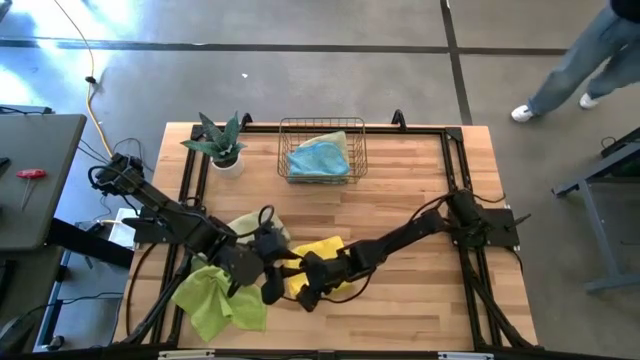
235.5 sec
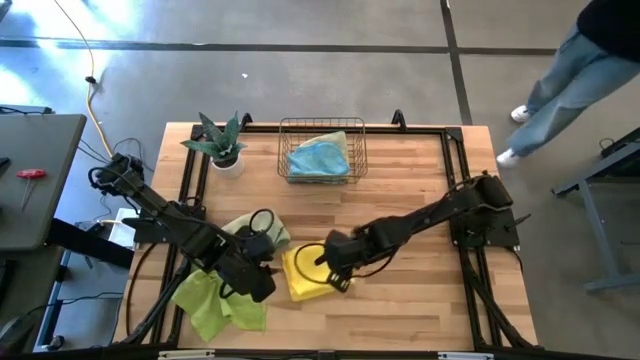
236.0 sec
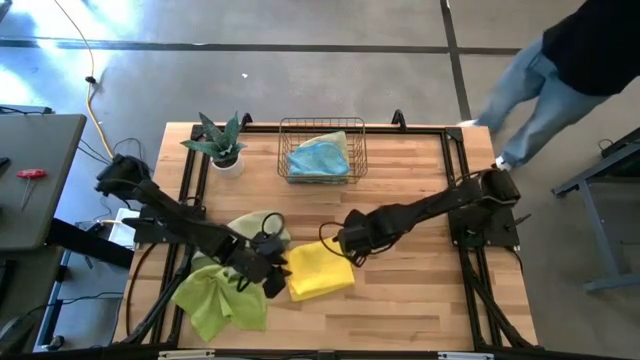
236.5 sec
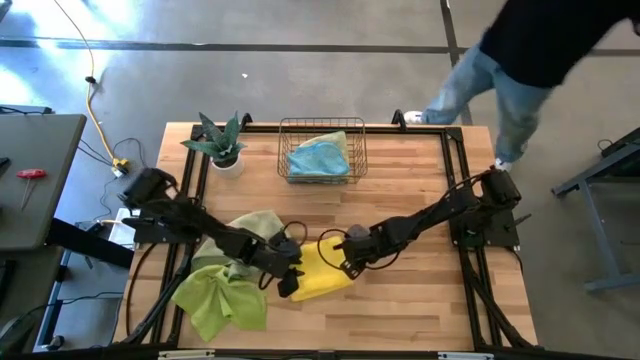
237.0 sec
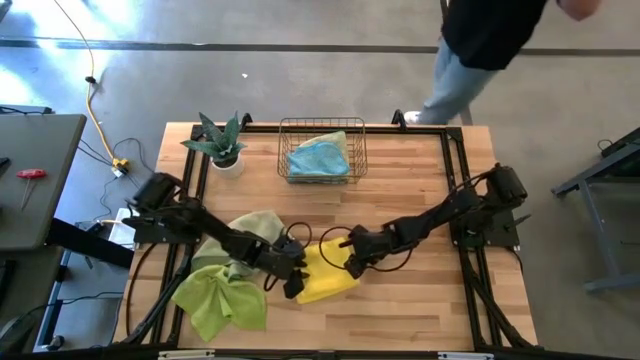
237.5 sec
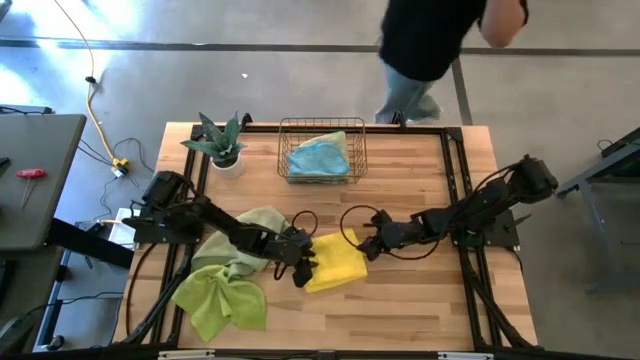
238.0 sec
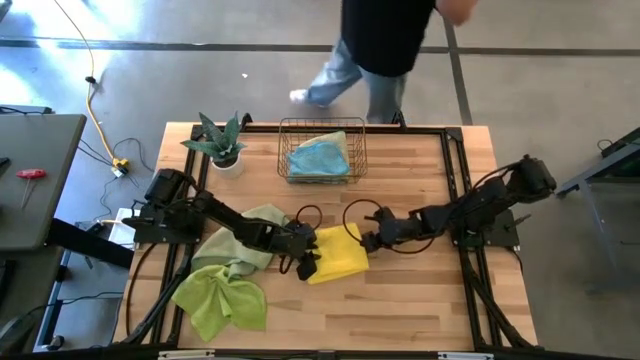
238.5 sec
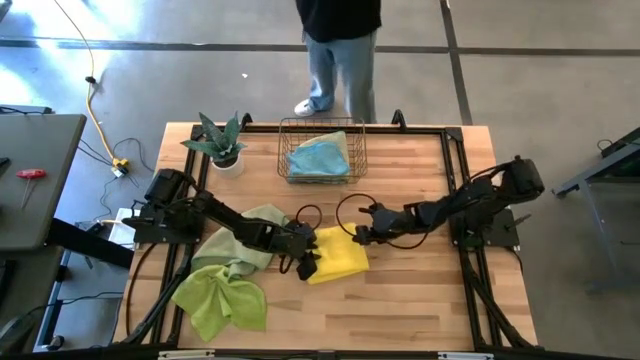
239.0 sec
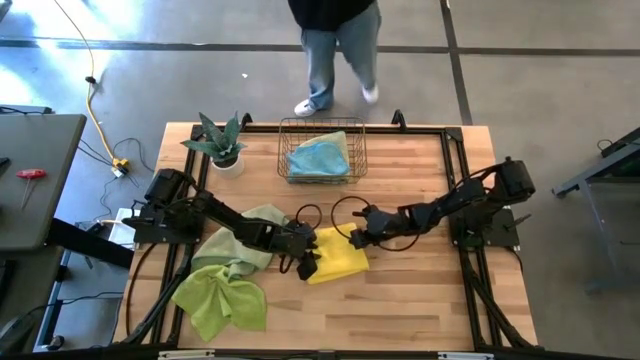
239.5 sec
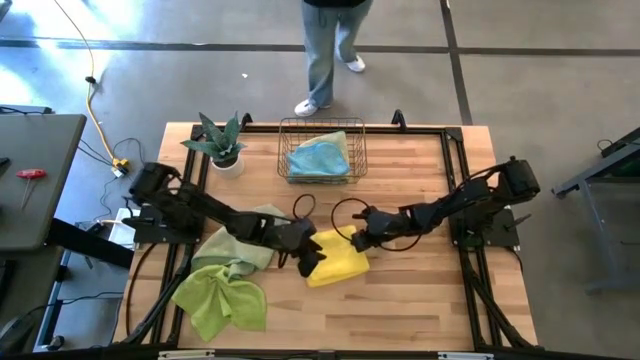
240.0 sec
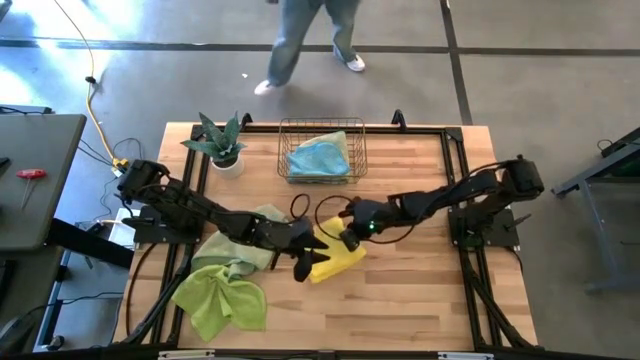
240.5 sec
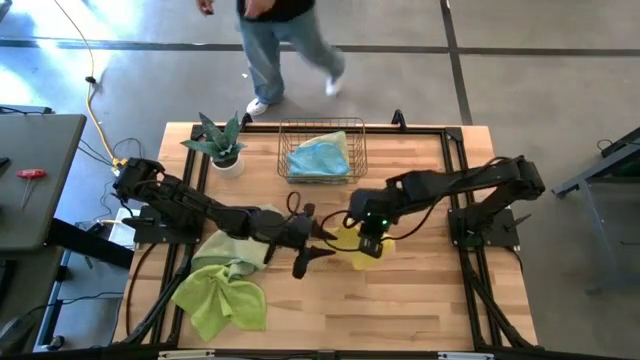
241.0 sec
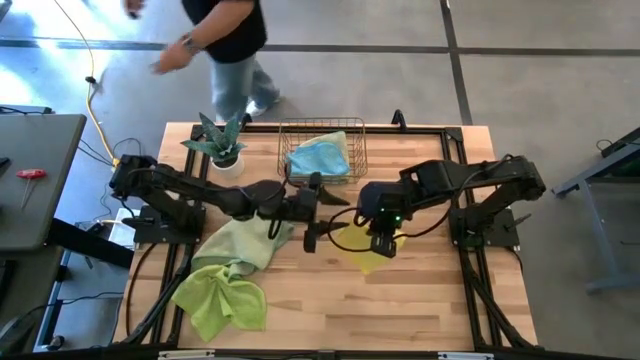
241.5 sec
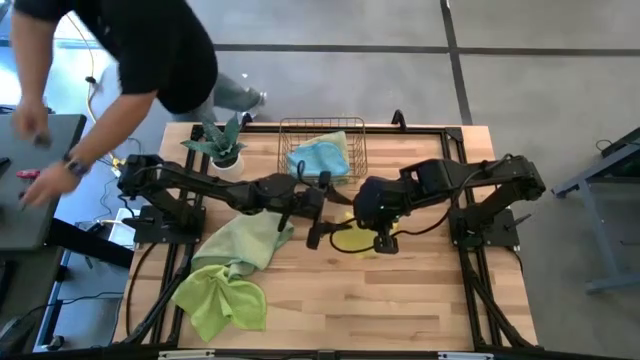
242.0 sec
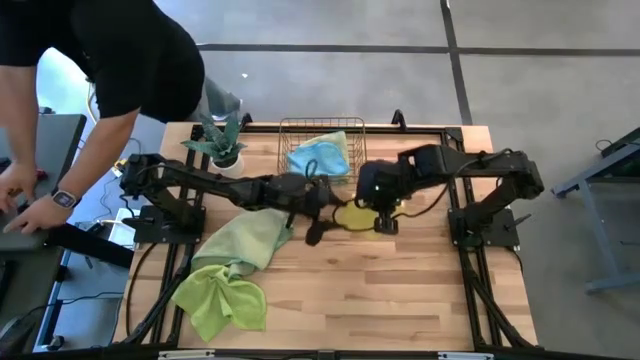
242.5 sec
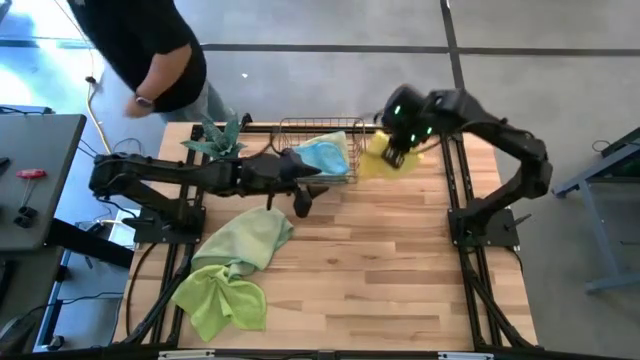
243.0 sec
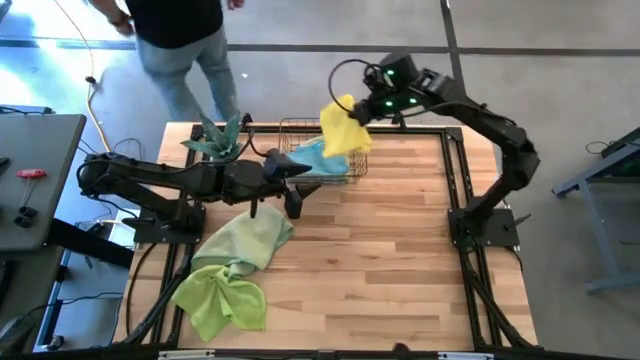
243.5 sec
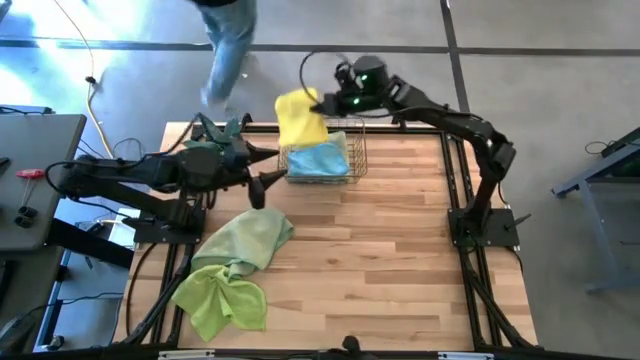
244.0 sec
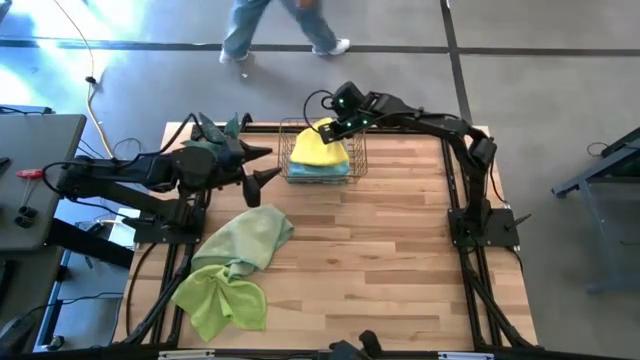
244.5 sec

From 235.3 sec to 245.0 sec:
Task: Fold microfiber towels
Put the yellow microfiber cloth in the basket

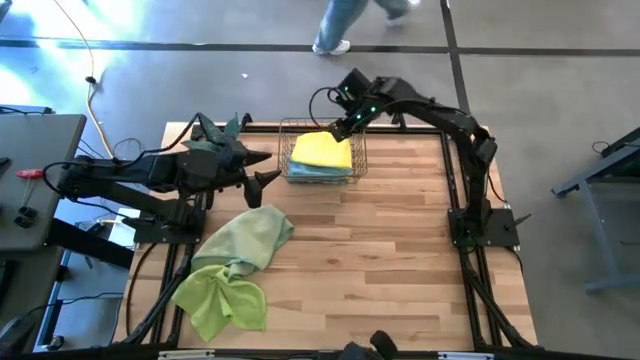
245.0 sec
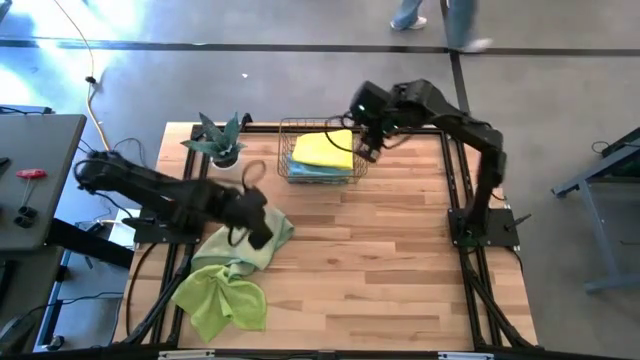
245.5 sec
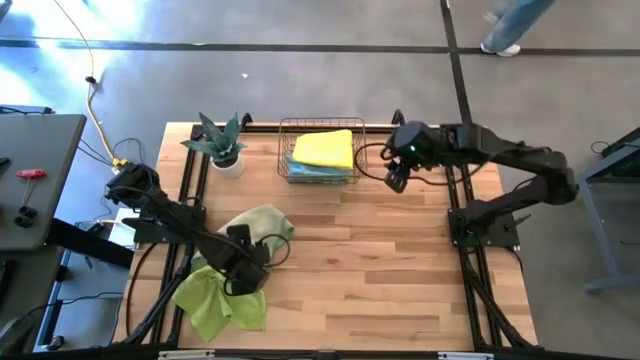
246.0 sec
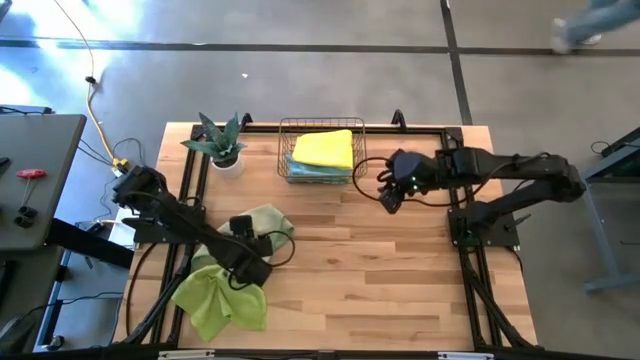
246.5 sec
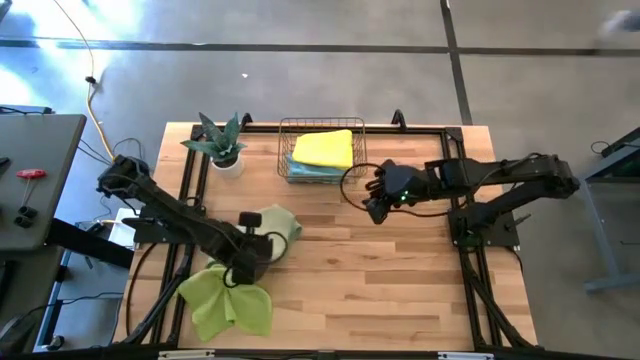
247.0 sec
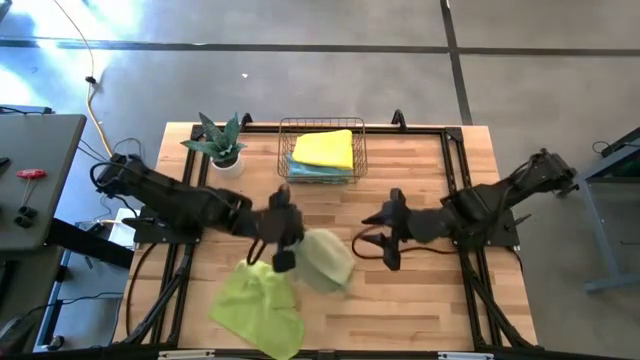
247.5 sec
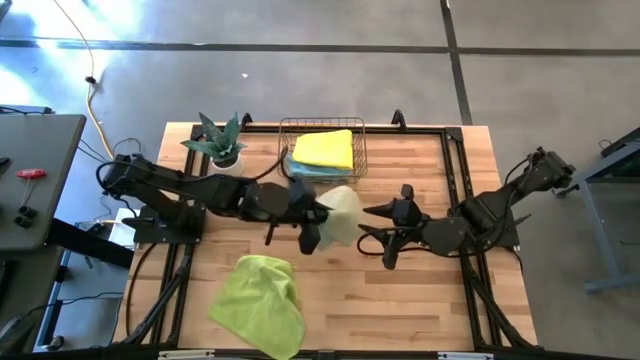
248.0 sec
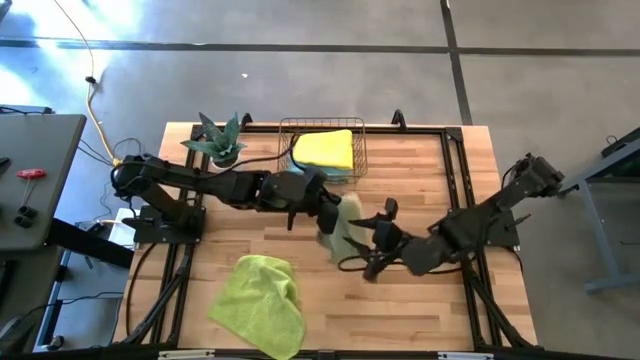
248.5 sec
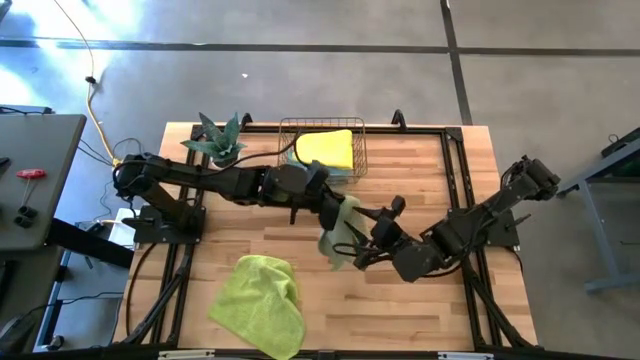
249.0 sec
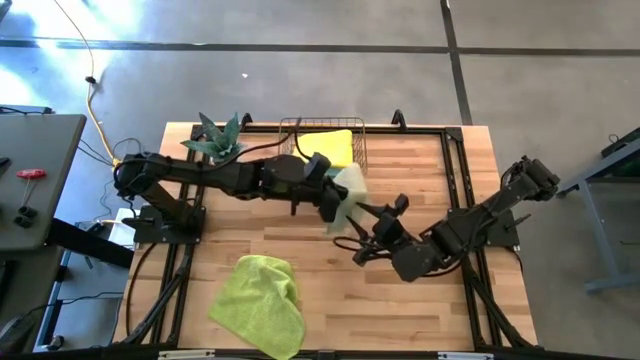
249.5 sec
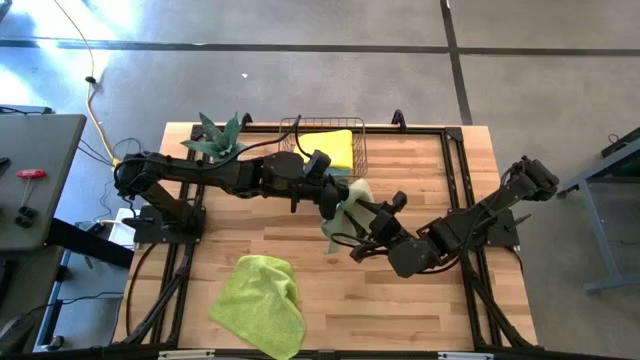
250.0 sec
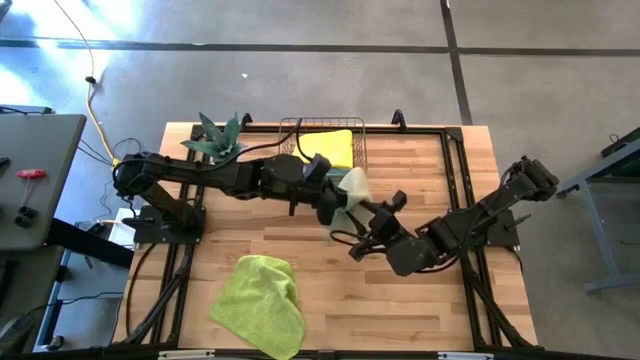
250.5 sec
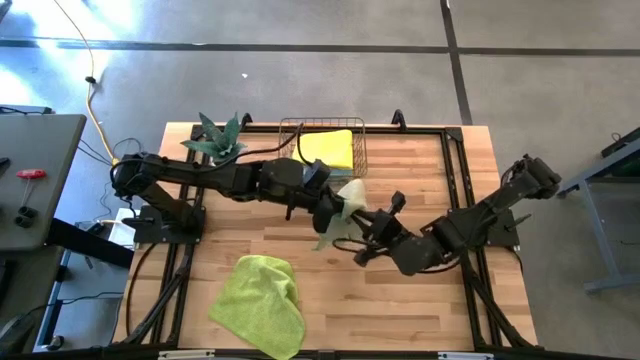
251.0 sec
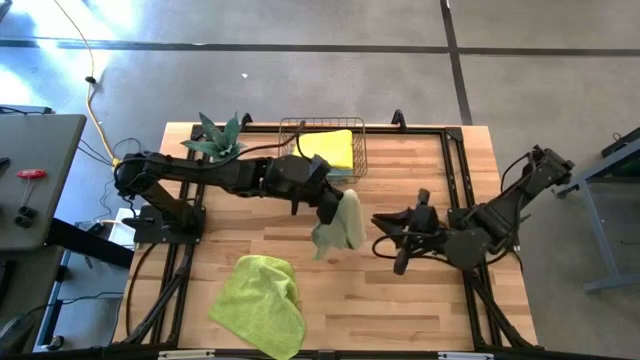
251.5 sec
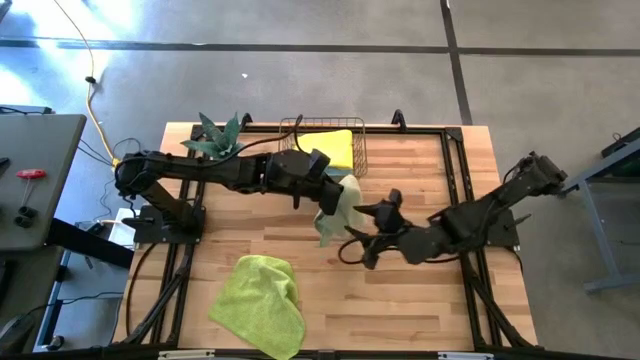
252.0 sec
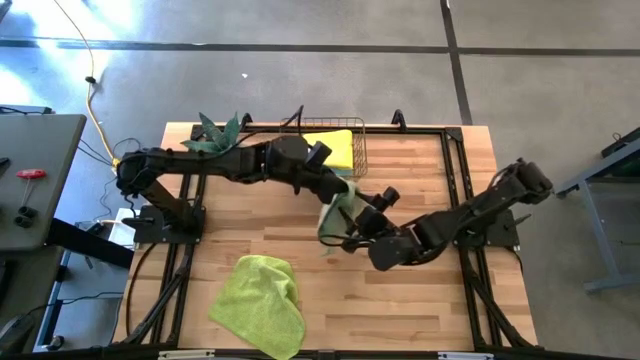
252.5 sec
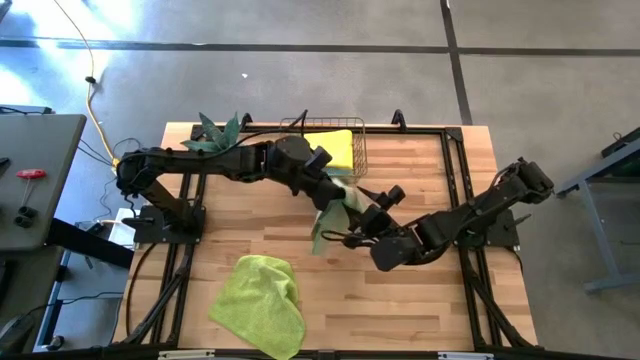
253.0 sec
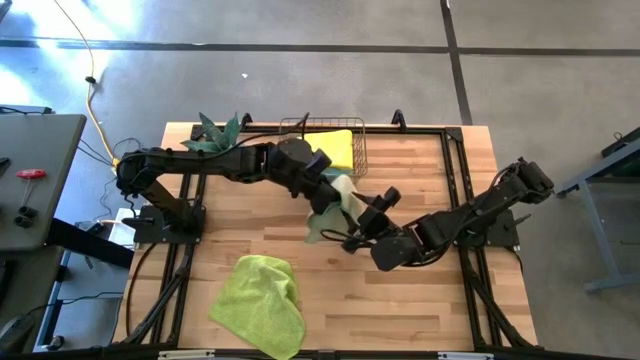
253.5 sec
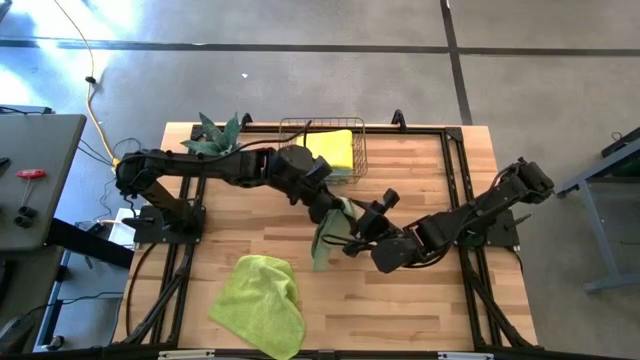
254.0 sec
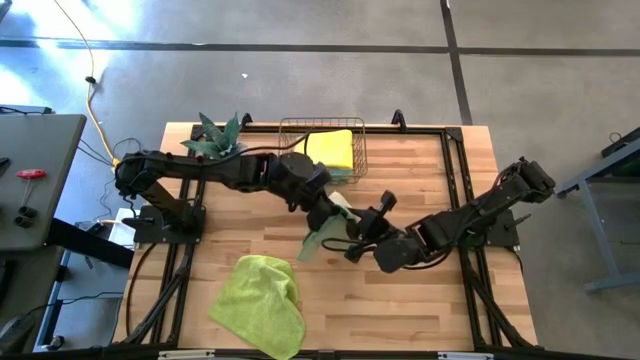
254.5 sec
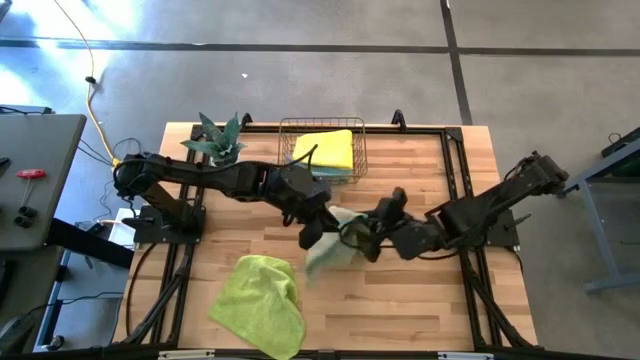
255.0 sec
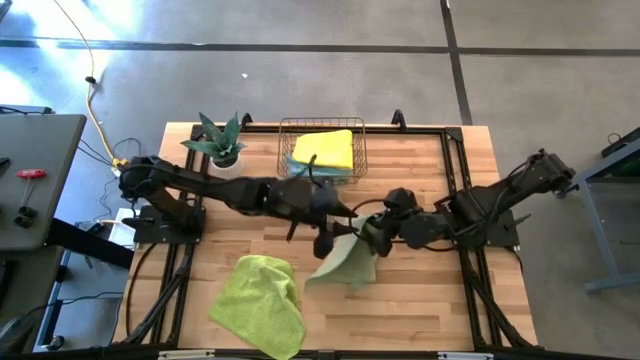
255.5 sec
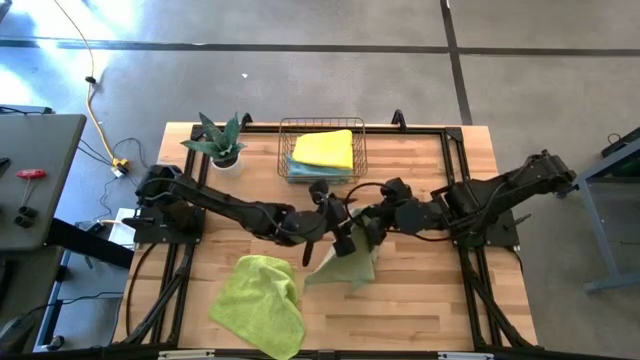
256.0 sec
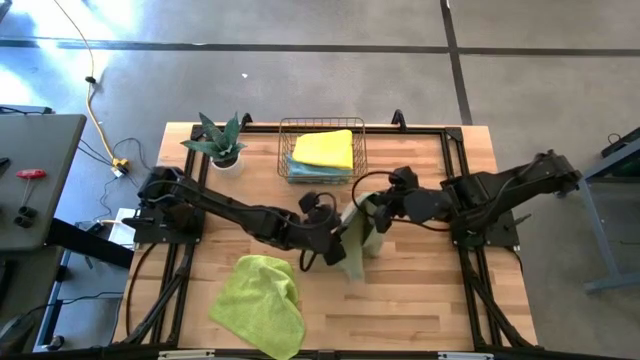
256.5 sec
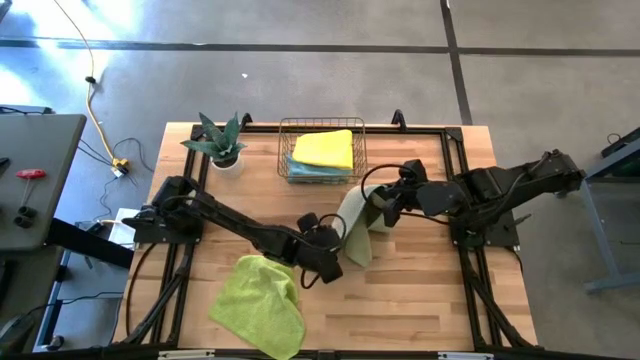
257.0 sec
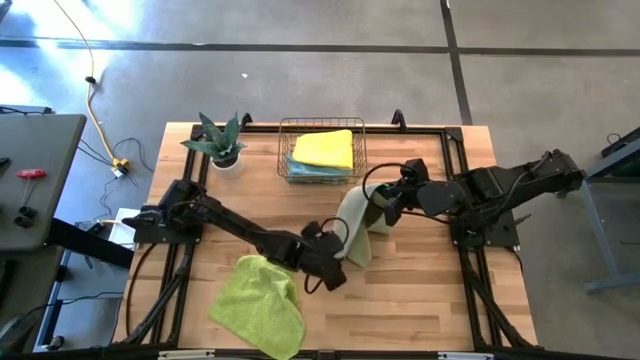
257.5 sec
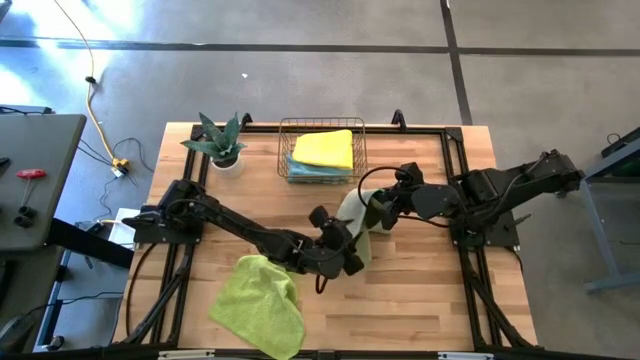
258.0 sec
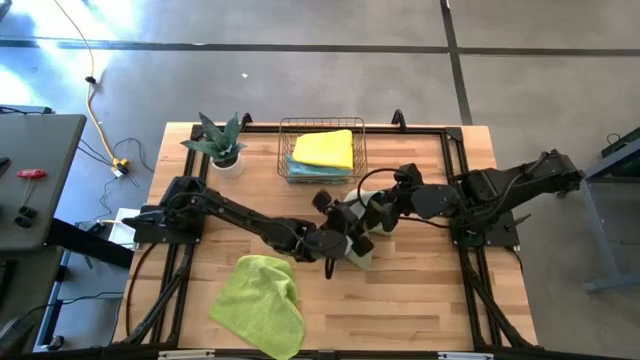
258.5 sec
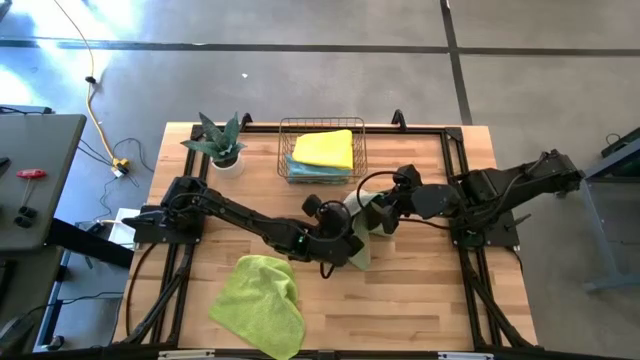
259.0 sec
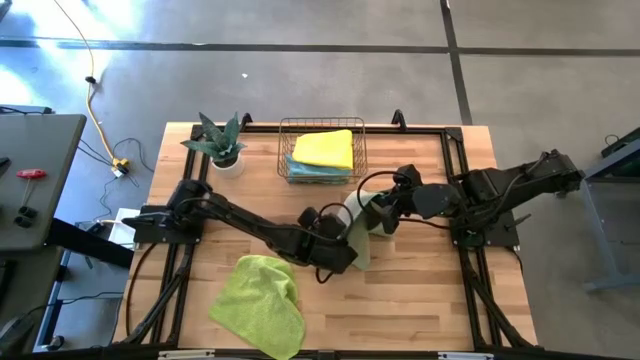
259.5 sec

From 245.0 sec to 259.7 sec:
Fold the light blue microfiber cloth
